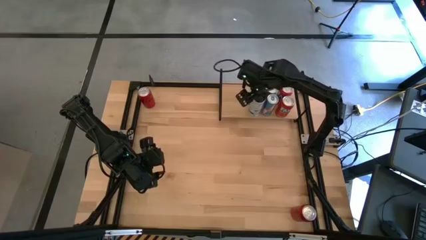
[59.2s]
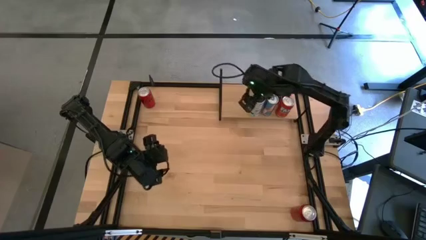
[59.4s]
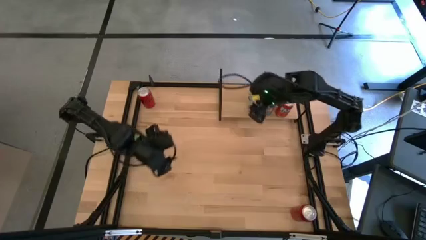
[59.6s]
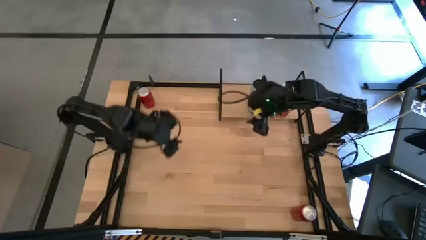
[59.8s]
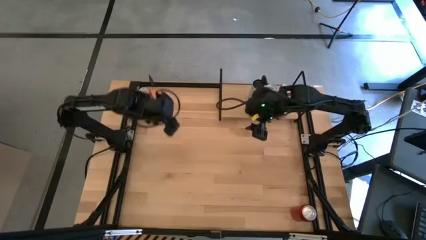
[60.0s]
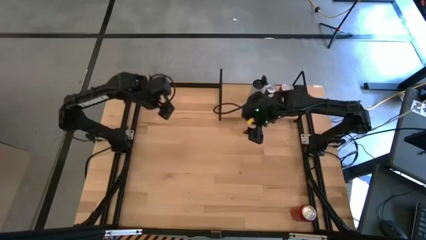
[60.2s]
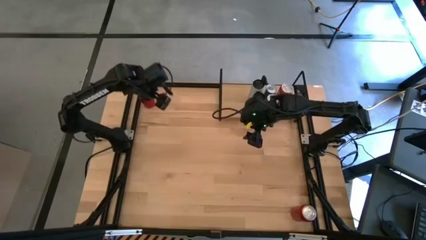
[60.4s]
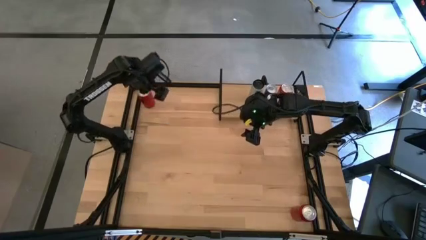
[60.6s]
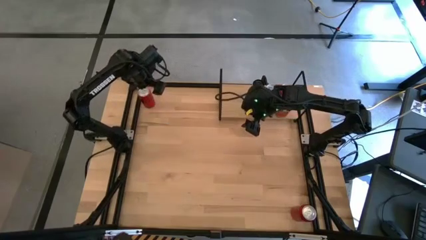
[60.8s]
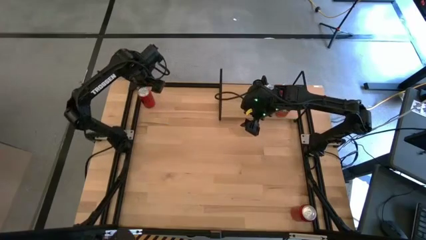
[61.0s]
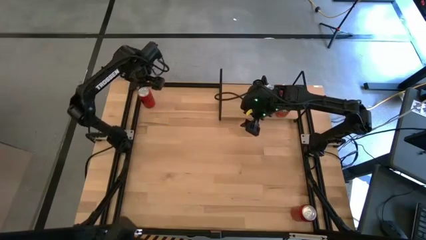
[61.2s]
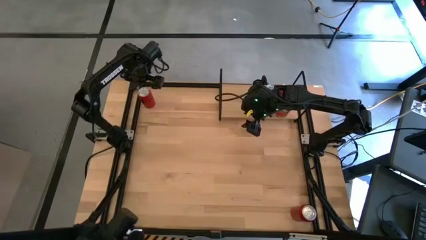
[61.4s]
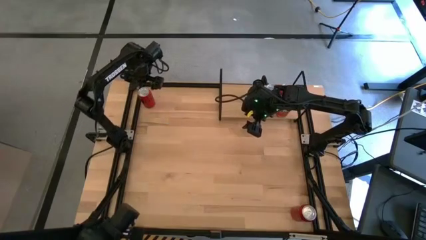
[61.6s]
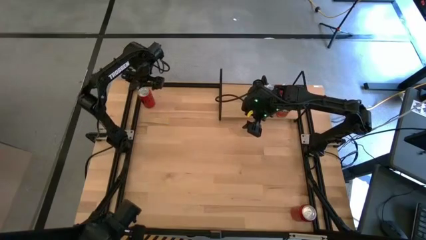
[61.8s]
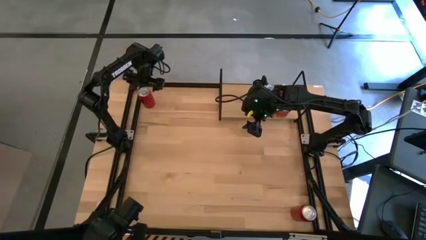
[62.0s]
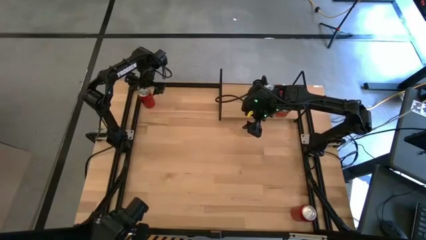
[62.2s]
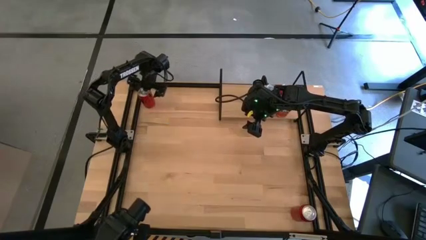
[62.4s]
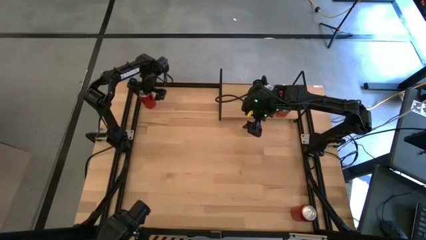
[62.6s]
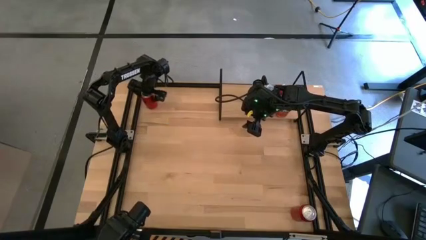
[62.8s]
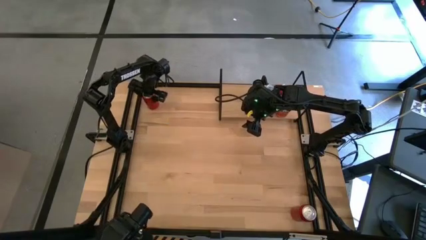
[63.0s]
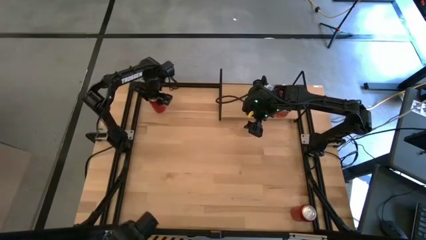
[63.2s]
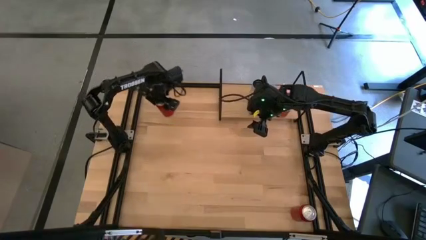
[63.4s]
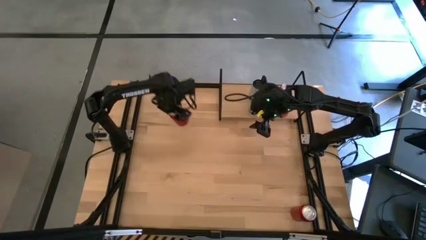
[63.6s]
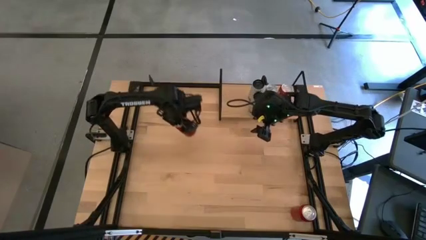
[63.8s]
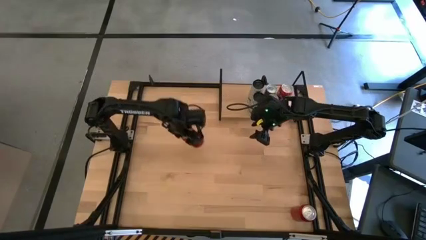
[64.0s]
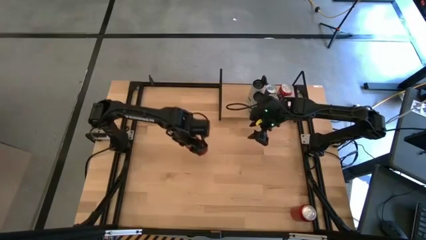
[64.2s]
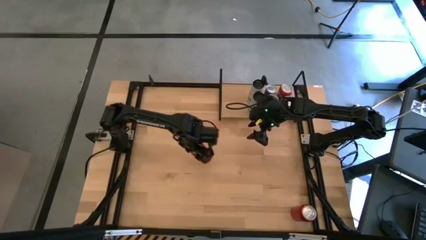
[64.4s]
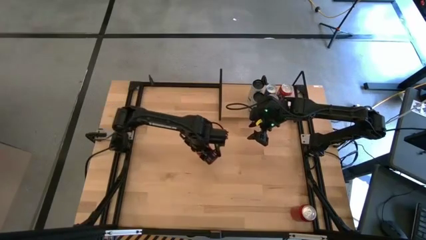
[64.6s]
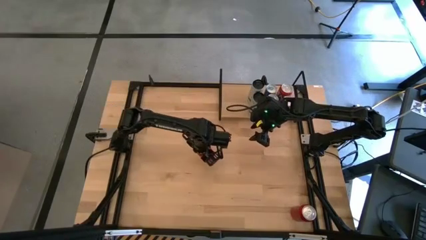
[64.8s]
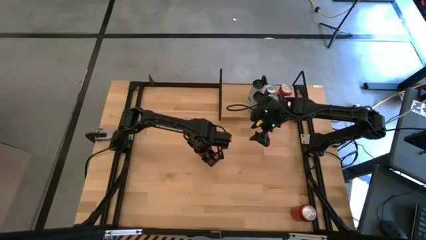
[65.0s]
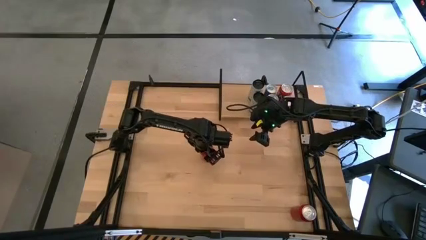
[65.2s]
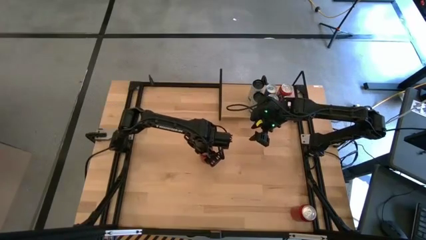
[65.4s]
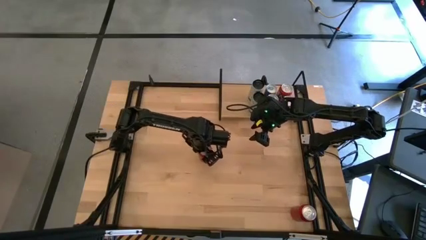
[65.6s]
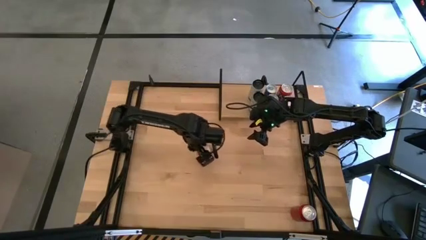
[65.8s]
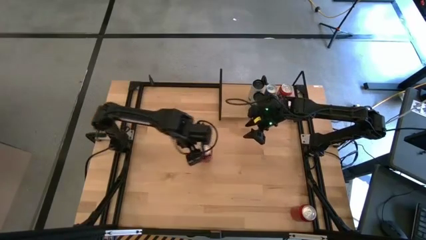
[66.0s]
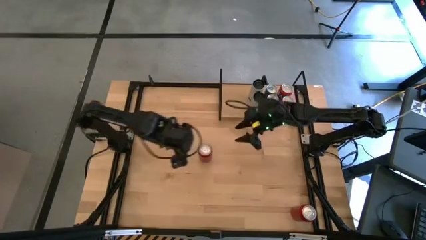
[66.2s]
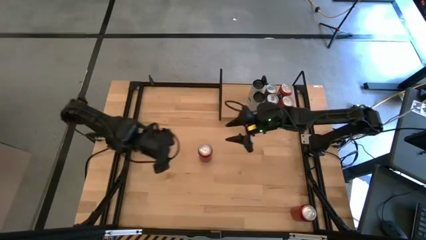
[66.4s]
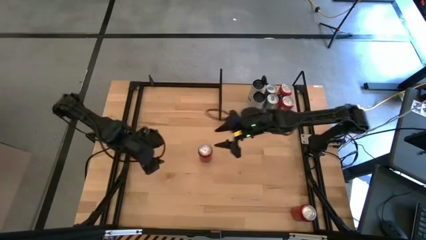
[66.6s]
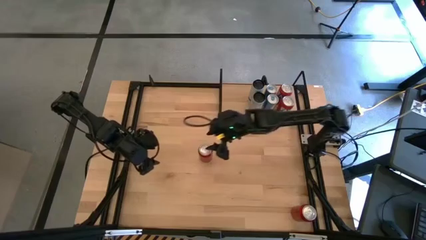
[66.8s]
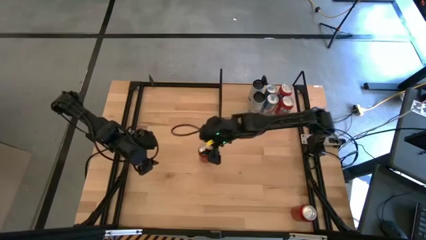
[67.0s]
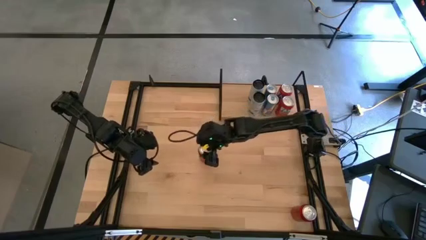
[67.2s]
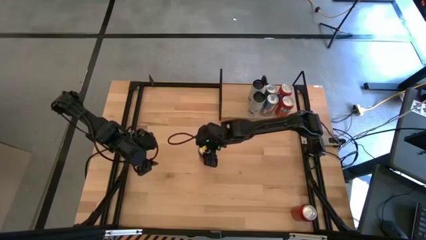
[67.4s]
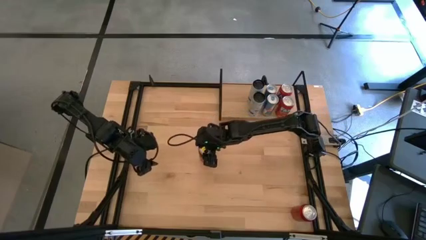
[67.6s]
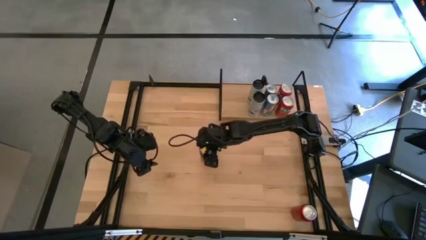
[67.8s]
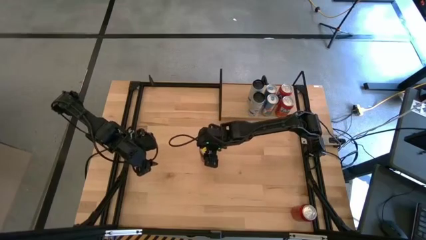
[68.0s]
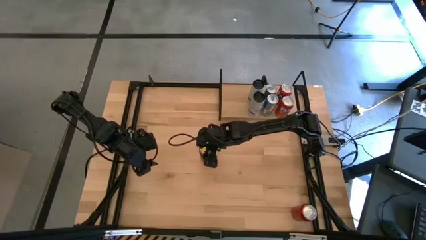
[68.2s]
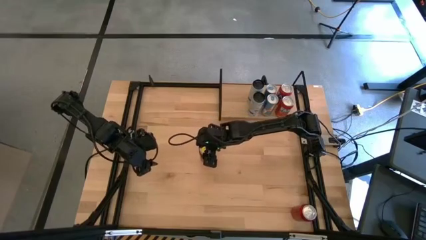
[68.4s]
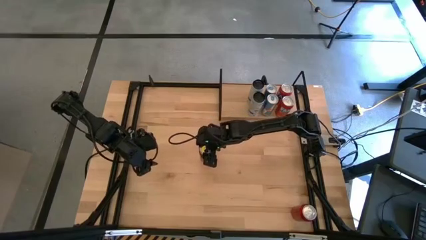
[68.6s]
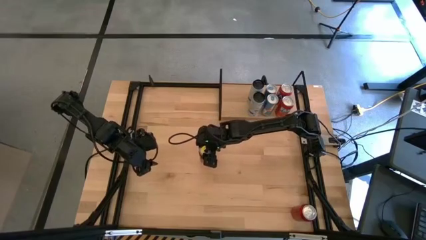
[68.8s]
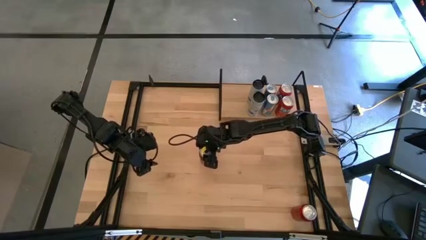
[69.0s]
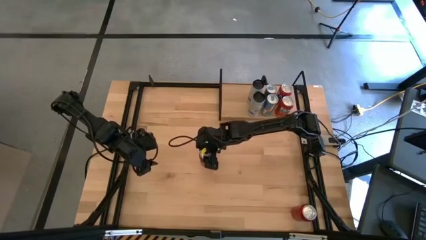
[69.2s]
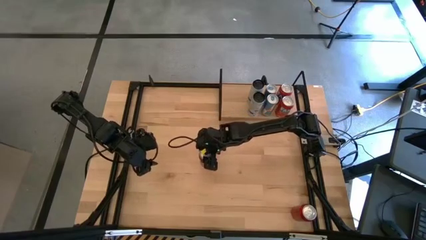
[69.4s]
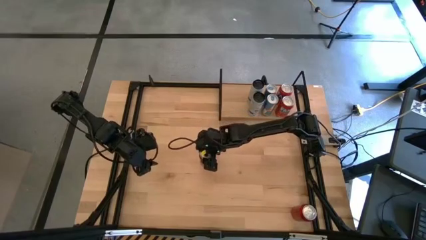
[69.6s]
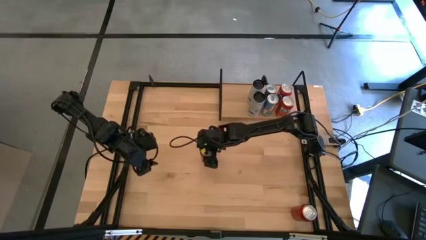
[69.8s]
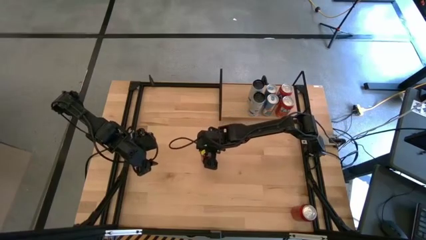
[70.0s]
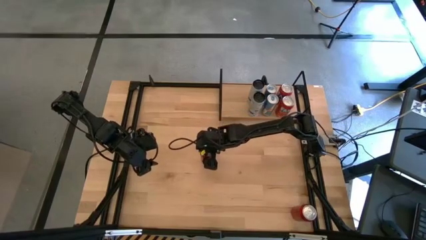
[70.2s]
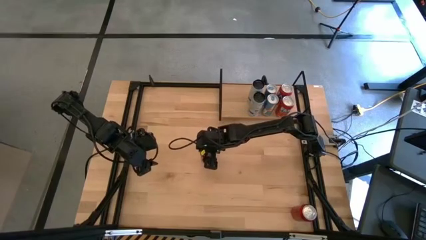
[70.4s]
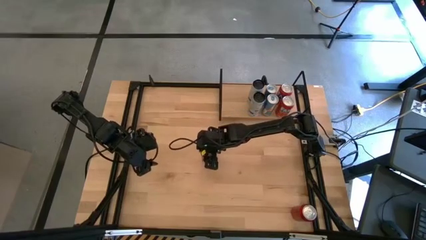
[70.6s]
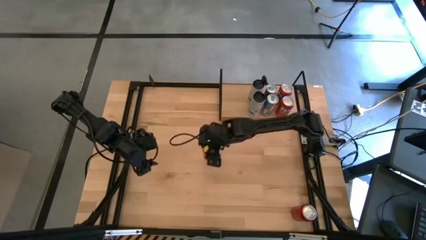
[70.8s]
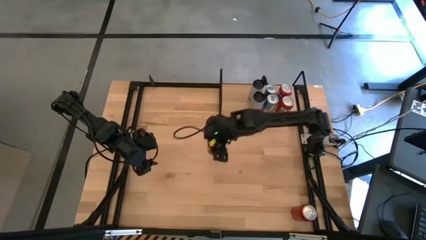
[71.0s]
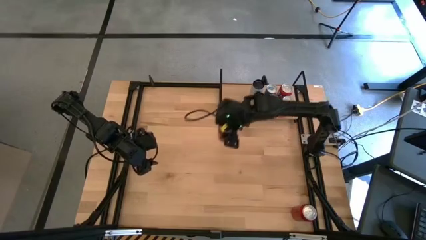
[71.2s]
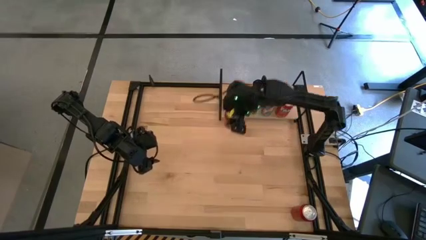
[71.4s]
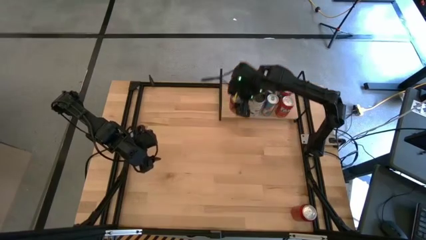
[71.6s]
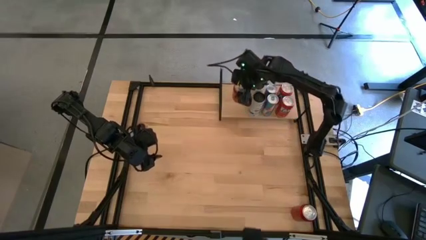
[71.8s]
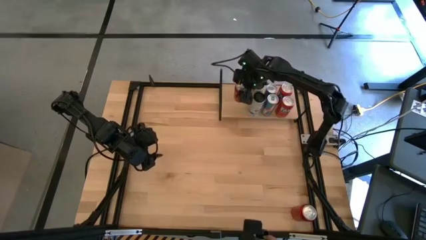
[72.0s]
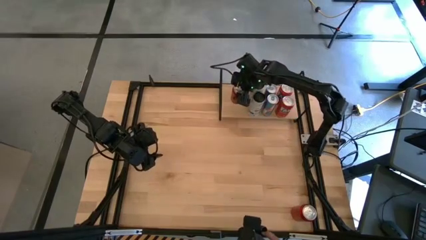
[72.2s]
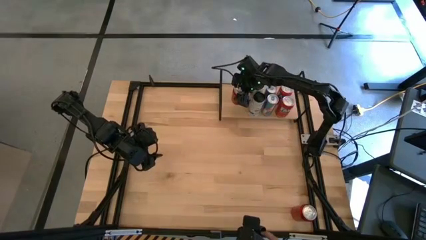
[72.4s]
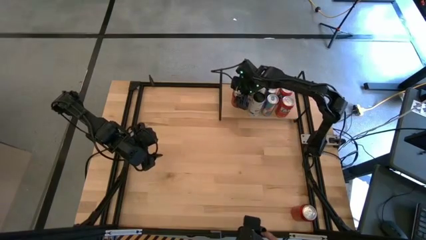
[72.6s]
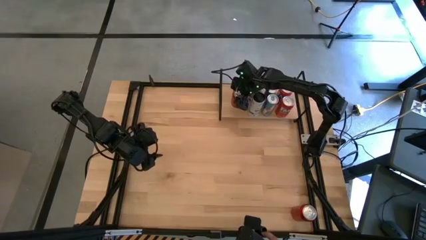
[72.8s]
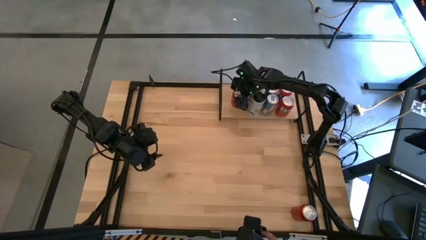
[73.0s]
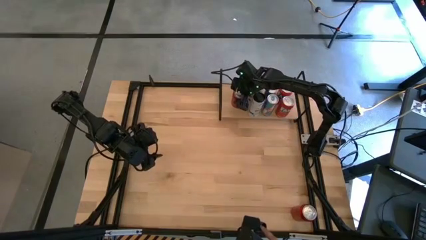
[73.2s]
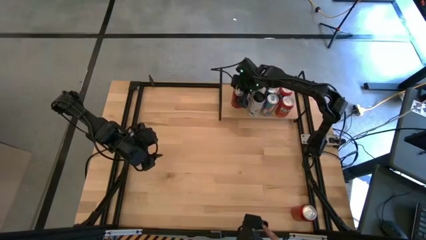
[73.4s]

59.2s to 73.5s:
Task: Place canned beverage on shelf
Put the top red soda can on the shelf

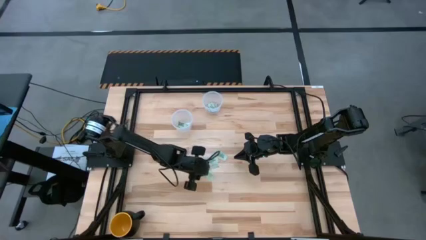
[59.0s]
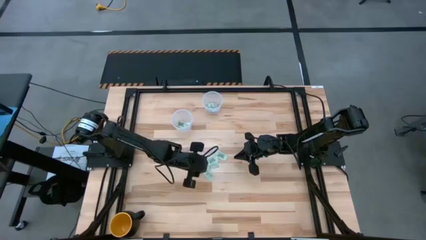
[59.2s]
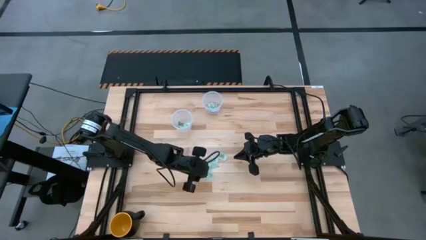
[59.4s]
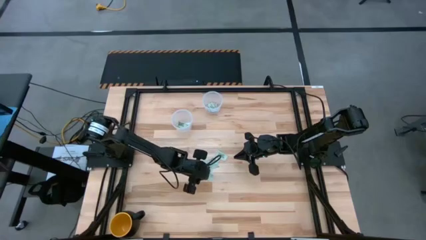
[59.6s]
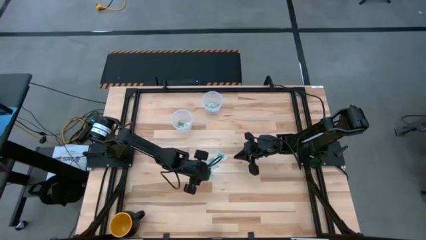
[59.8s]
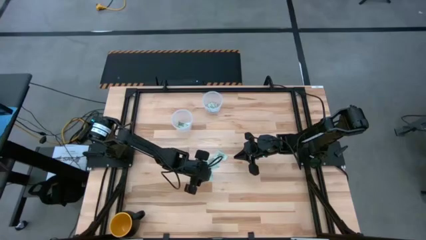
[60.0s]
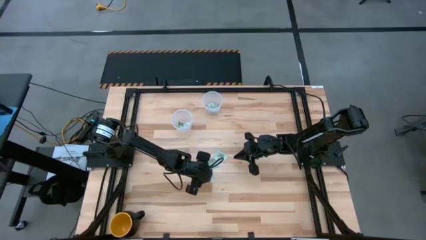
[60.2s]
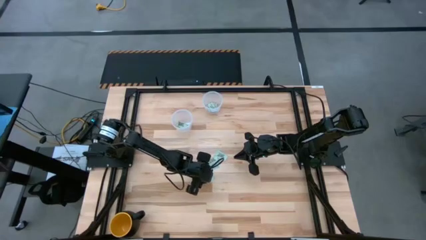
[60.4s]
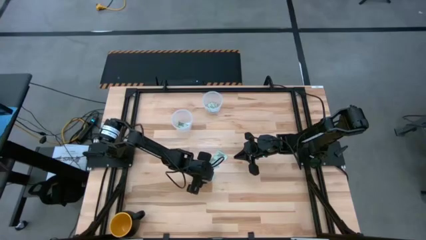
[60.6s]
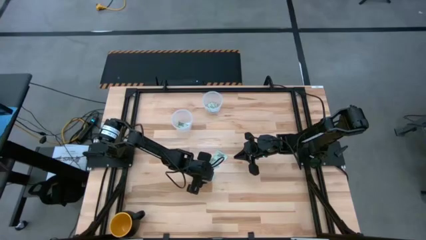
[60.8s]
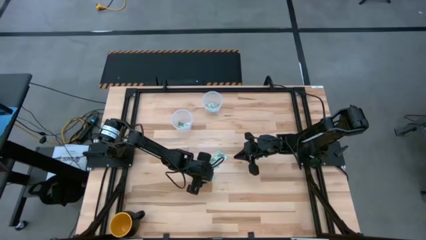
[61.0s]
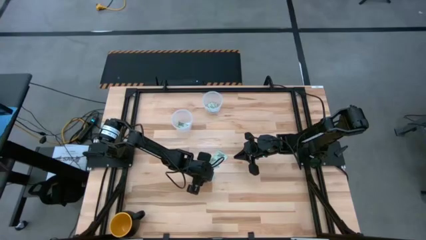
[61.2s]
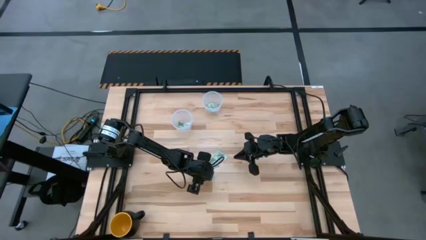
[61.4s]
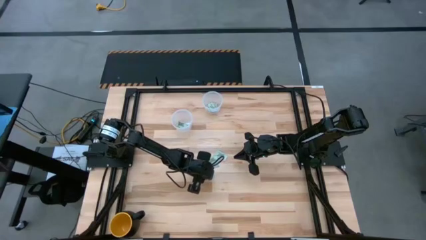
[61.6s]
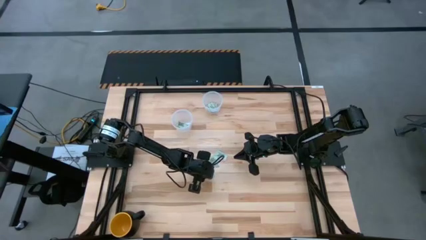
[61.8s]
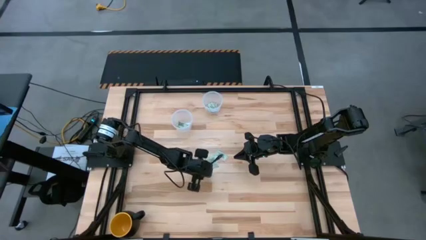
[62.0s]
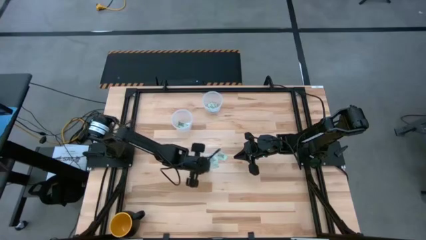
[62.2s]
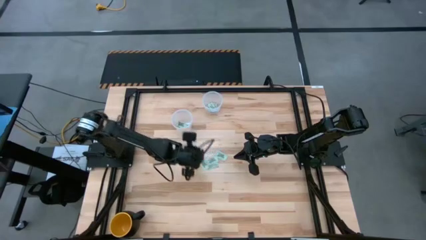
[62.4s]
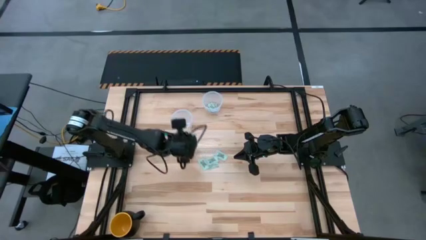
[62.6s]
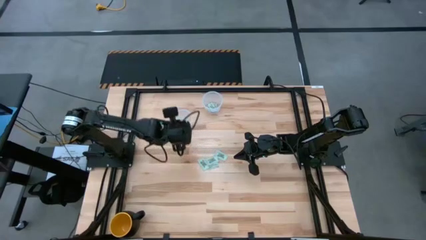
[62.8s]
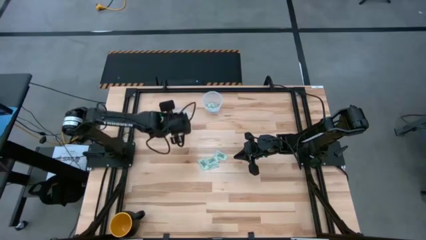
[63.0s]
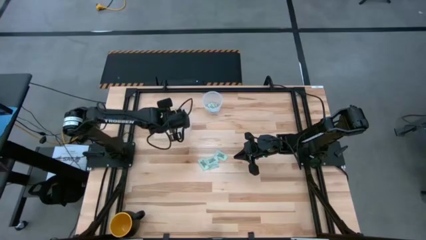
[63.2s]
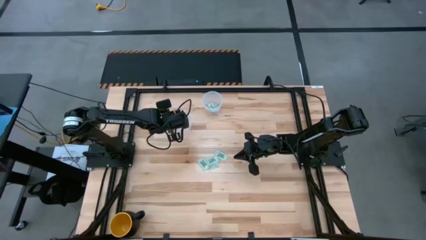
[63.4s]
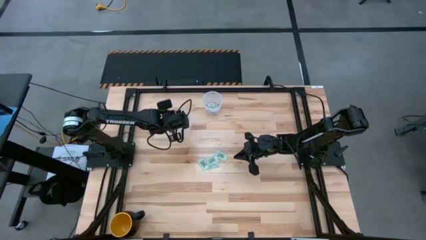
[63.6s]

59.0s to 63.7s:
Task: Pick and place items into bin
Put the stevia packet into the bottom transparent bin
